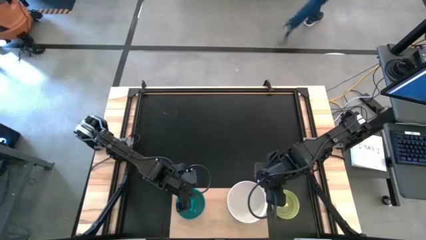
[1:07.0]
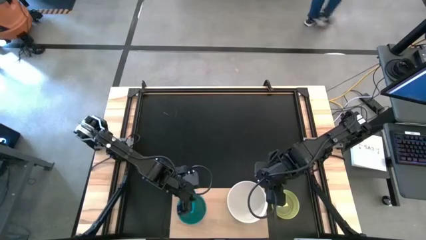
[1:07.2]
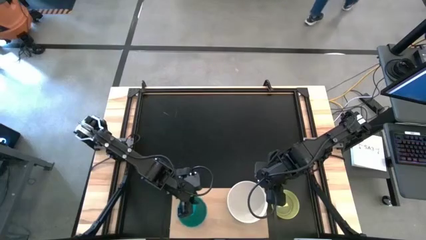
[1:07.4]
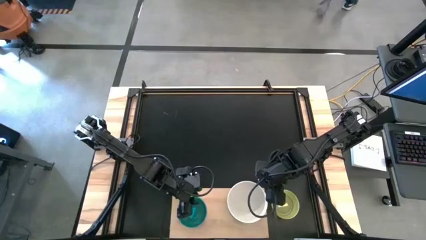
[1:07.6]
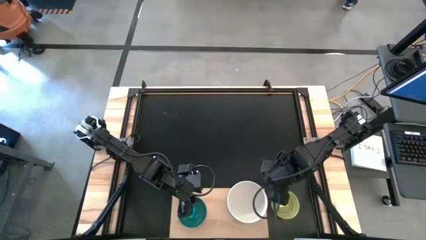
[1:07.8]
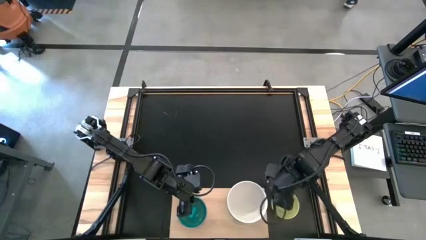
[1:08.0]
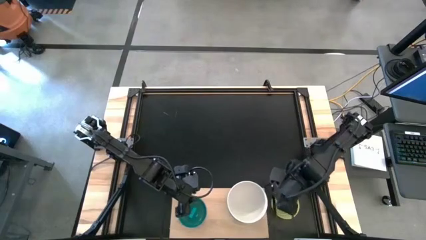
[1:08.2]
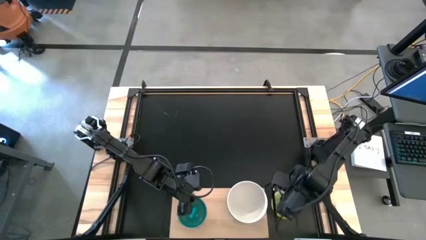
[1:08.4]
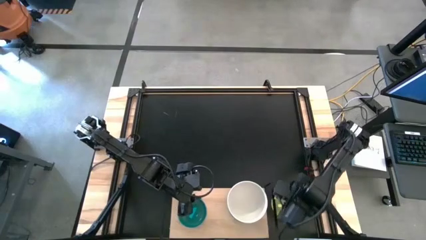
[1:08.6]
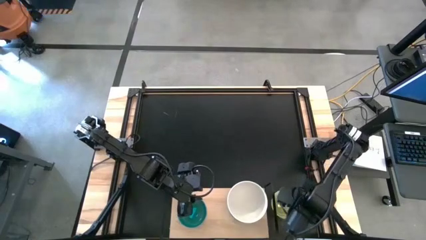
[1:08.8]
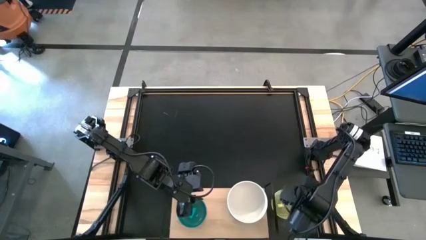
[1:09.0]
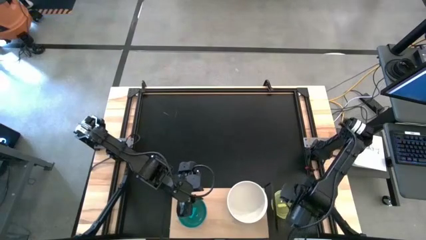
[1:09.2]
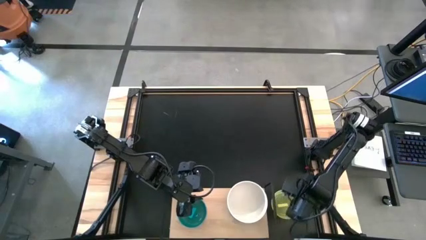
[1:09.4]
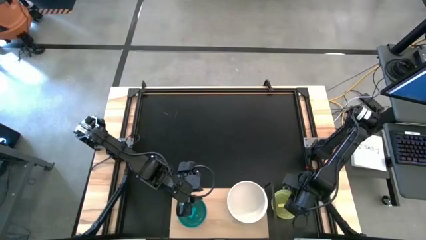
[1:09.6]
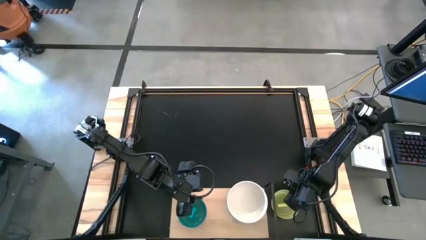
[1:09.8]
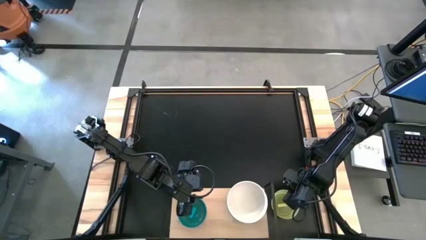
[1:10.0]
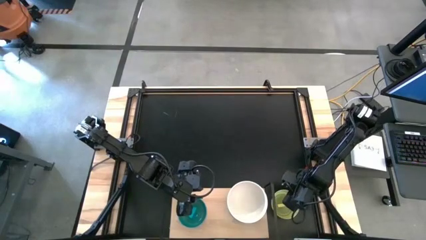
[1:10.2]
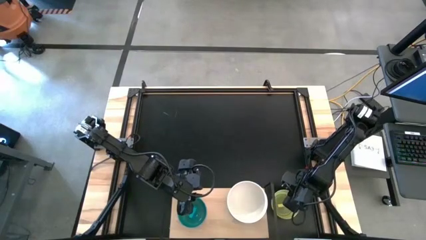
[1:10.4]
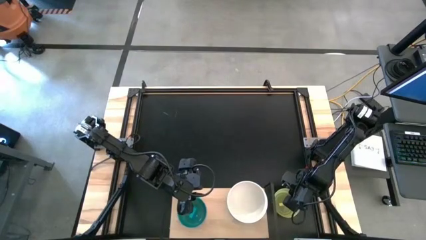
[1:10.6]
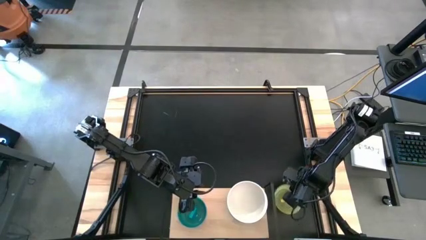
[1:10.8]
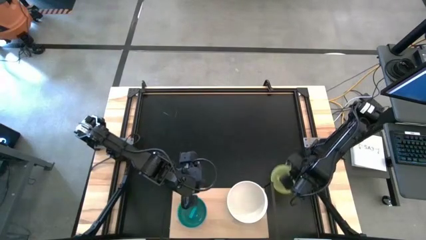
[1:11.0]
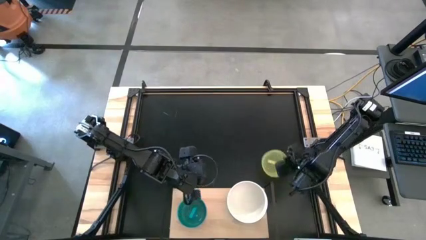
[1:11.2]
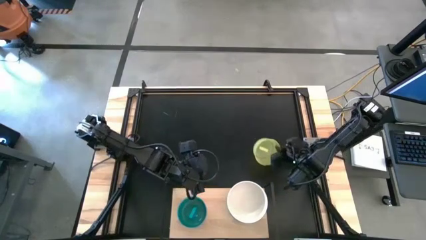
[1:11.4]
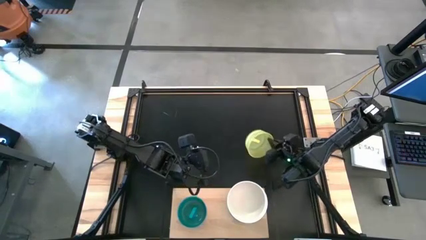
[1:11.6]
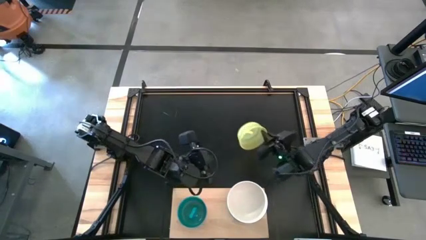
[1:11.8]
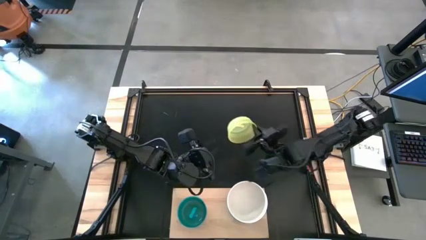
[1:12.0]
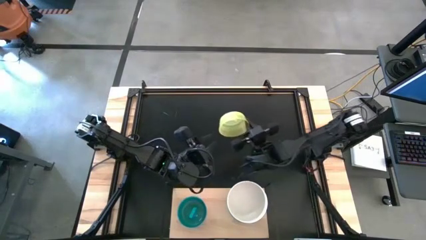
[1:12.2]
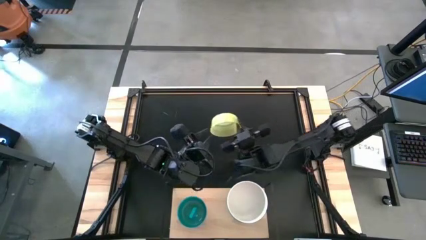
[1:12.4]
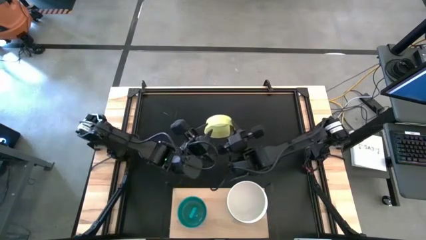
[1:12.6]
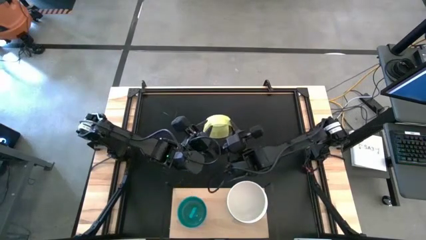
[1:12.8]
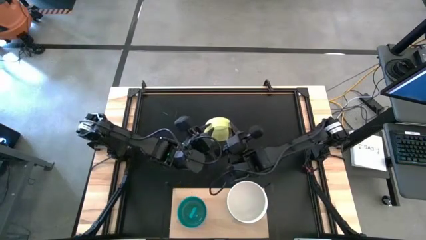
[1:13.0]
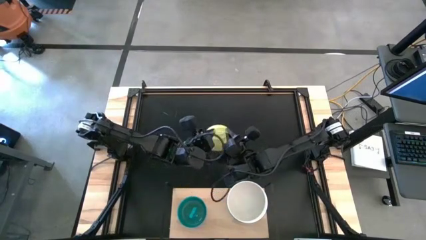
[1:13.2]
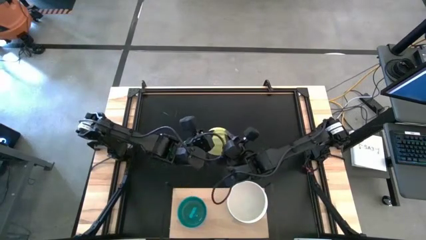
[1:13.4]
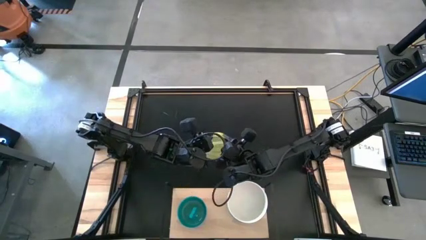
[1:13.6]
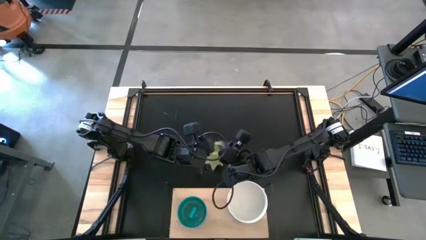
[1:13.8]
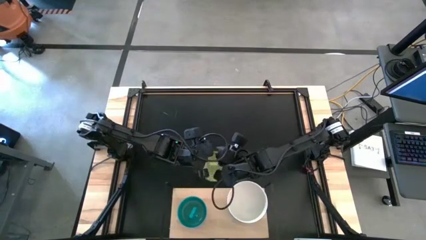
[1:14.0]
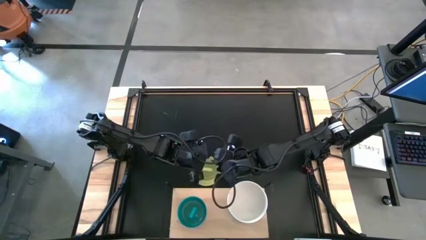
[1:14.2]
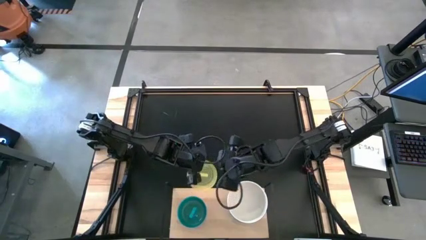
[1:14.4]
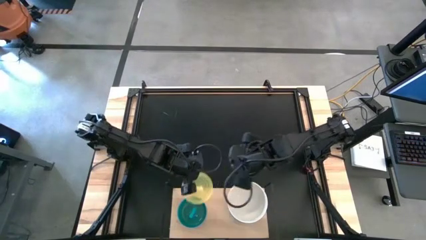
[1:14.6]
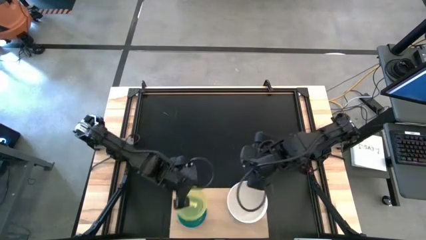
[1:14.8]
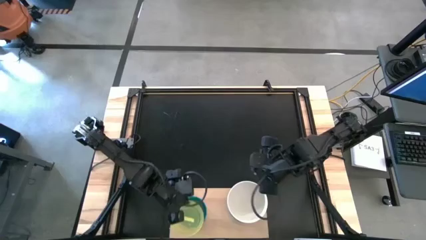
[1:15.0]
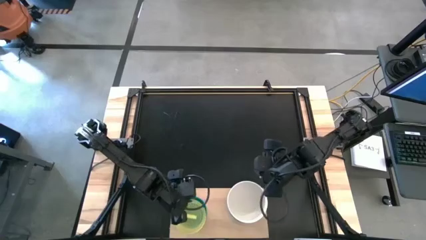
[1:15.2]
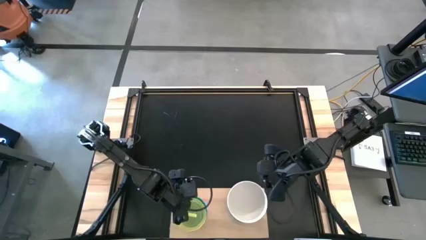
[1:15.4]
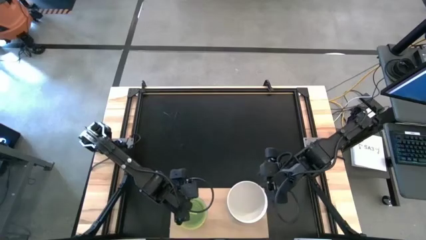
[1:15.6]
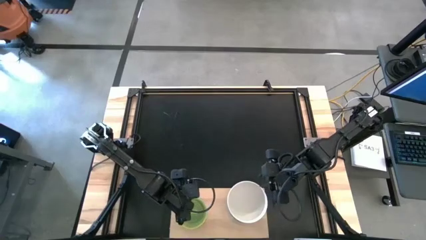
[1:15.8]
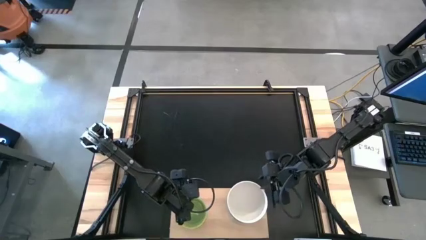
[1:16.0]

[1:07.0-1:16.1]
Task: Place and stack bowls onto a shelf
Stack the yellow bowl on top of the light blue bowl on the shelf

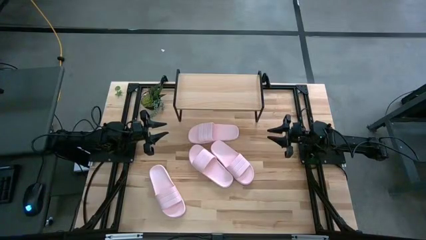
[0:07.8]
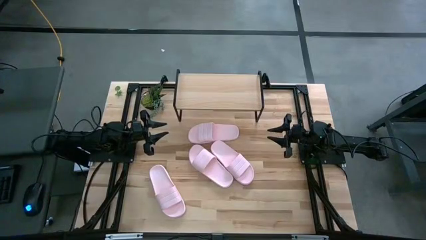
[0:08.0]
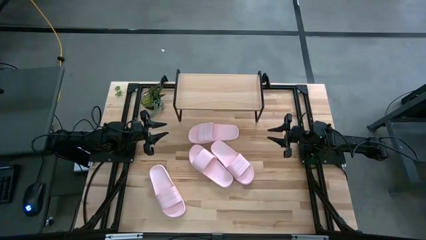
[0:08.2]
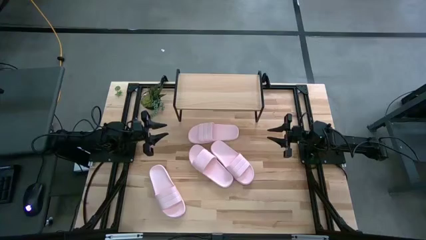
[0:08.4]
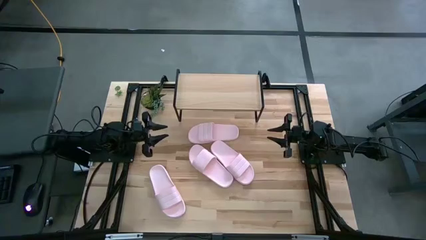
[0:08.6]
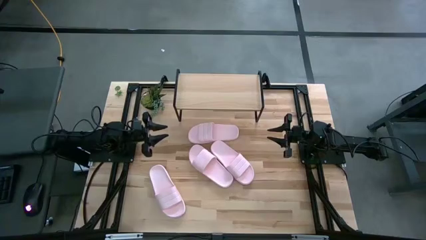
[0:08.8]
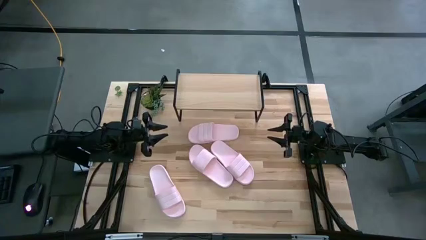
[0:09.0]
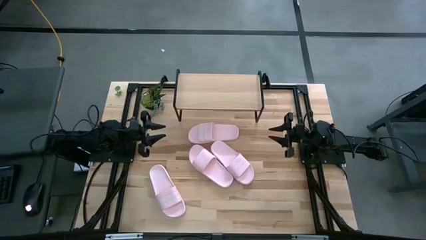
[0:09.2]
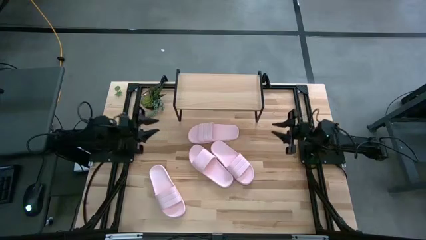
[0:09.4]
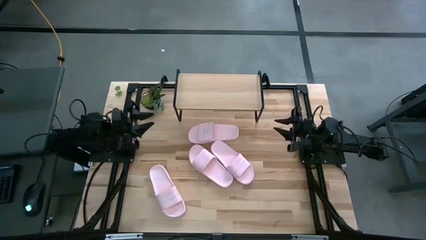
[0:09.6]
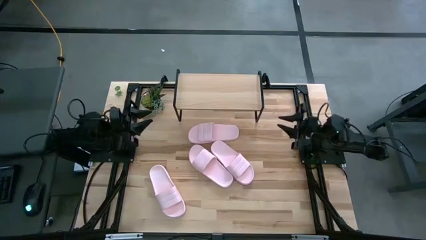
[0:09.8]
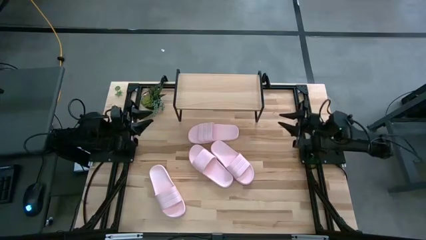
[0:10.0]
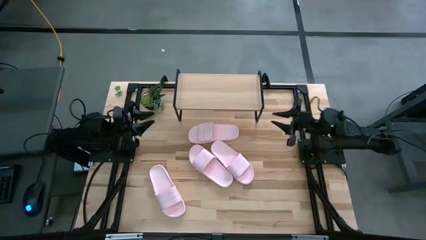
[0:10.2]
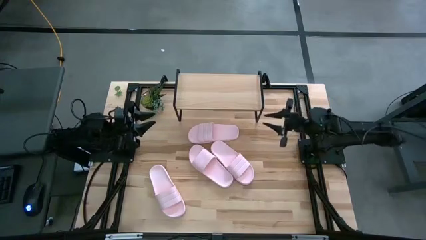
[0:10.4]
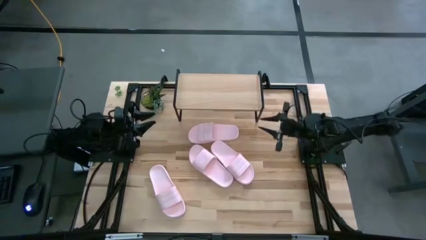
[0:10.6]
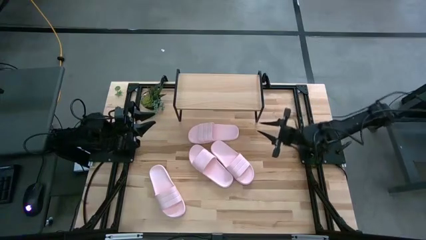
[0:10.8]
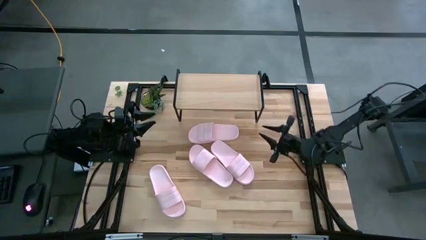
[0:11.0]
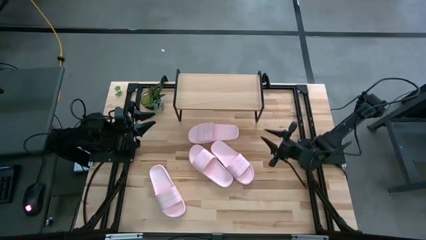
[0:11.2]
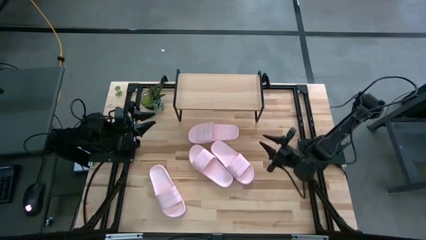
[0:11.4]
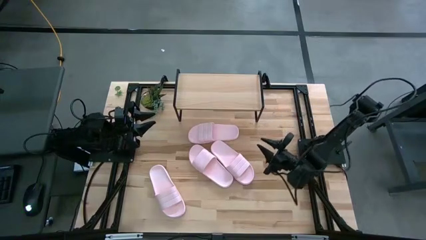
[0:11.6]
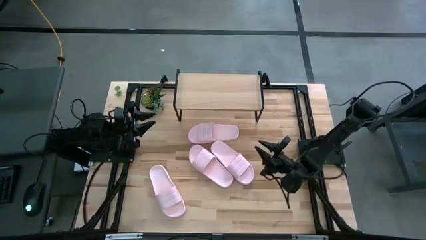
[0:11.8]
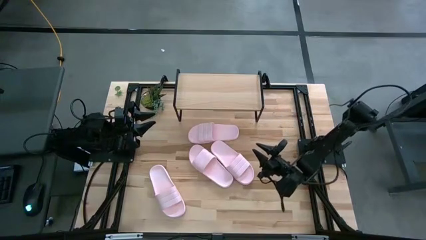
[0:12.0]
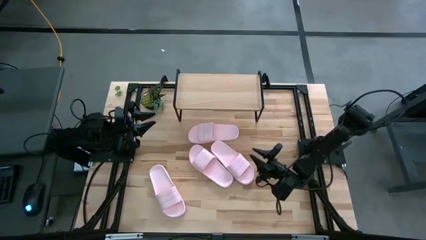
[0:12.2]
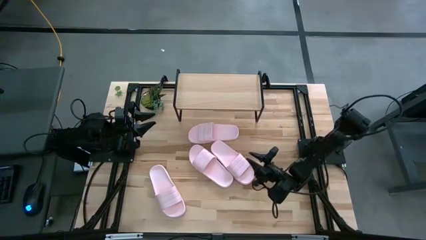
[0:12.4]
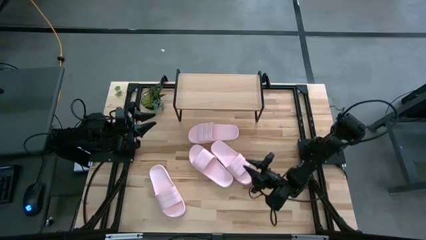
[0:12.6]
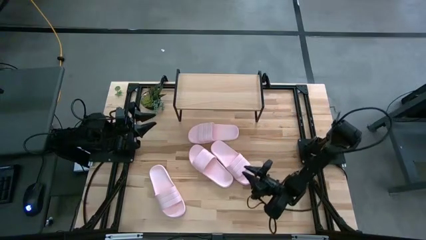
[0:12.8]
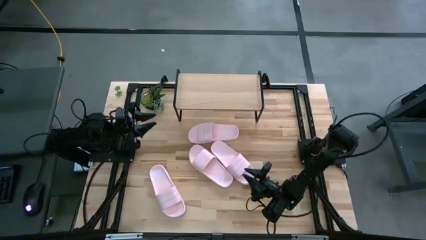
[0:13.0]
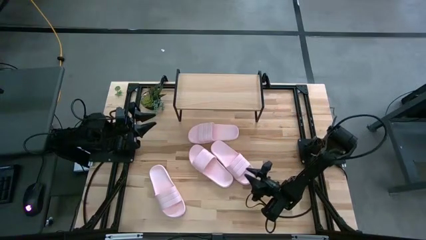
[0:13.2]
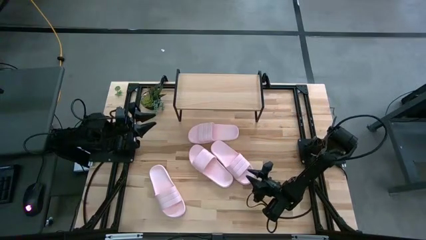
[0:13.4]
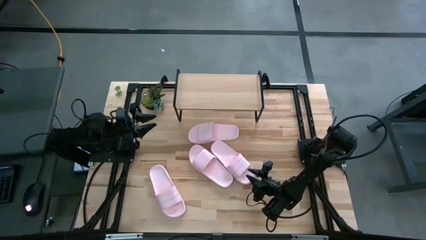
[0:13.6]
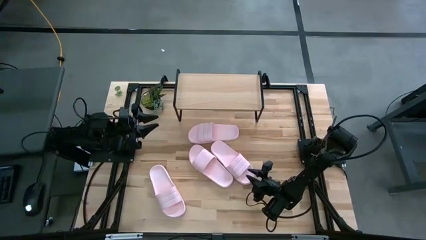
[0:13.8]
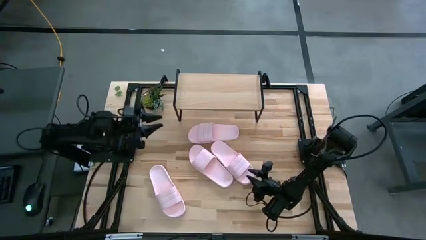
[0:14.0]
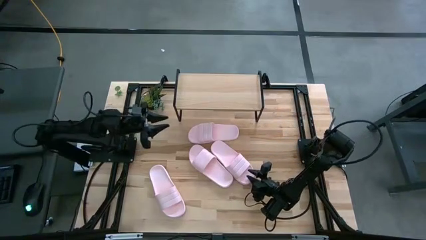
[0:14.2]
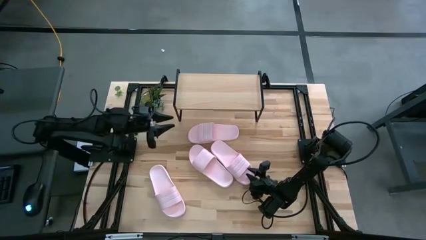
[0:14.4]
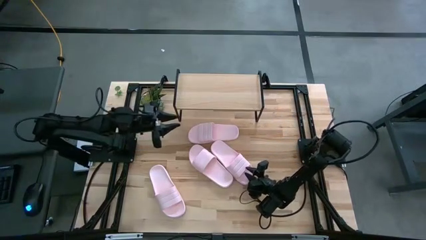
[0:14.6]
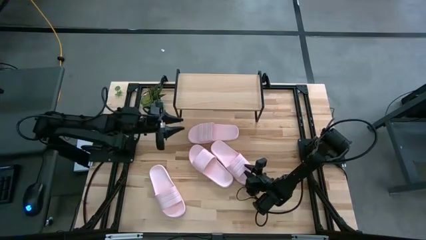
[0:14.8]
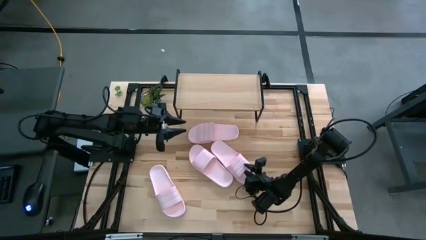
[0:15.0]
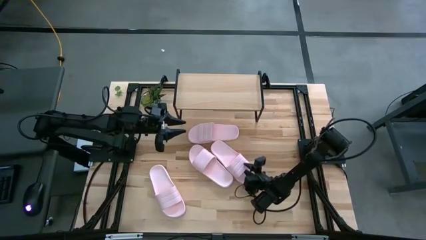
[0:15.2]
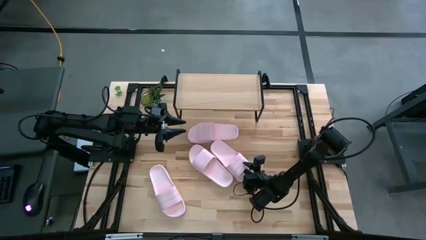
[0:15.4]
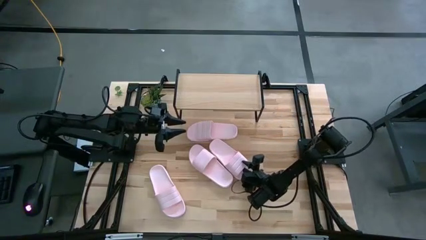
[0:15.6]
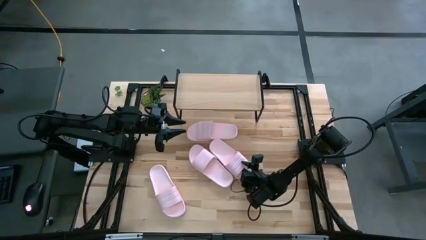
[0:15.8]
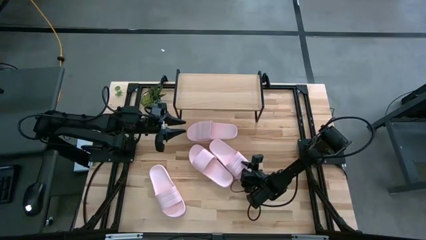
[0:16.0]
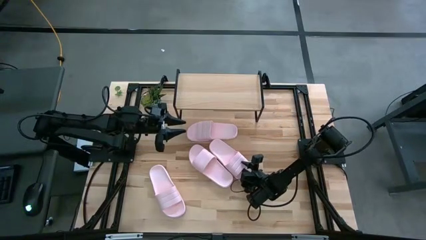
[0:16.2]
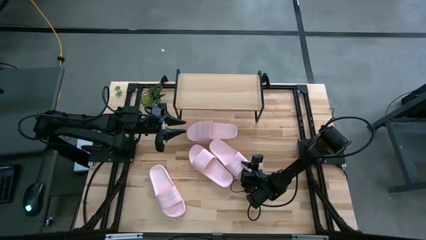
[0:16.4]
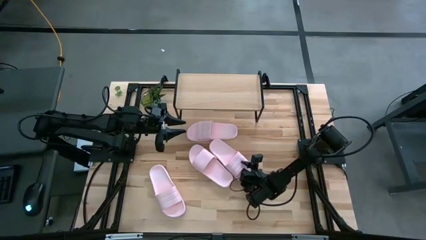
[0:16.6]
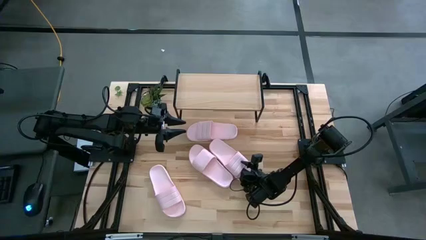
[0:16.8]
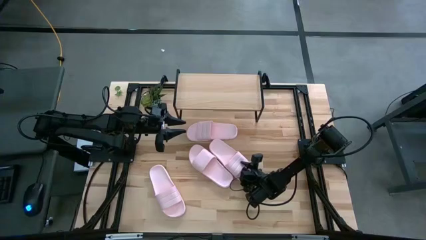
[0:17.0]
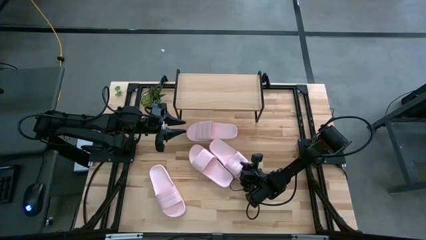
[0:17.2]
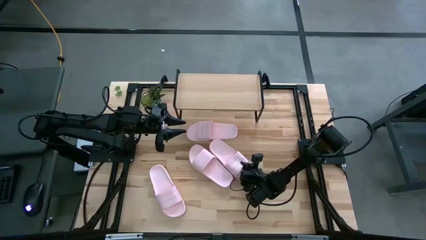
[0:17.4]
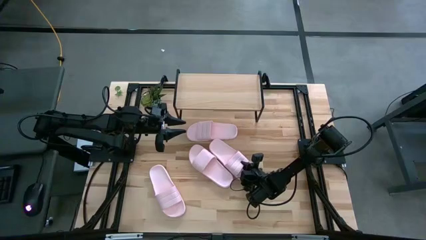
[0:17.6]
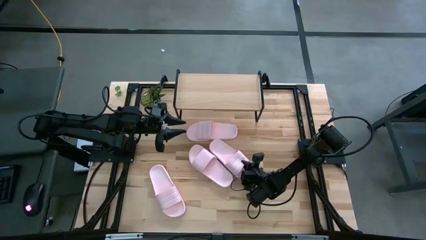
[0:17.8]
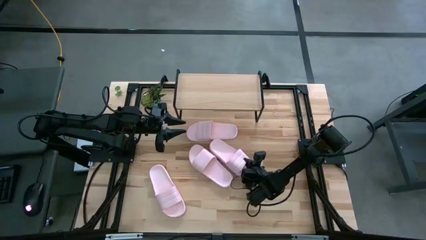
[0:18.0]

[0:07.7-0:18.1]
Task: Pick and place slides into the shelf
Put the pink slide on the shelf
